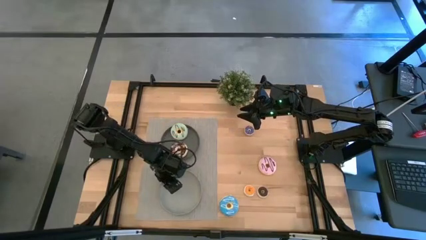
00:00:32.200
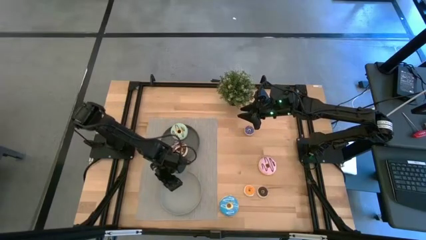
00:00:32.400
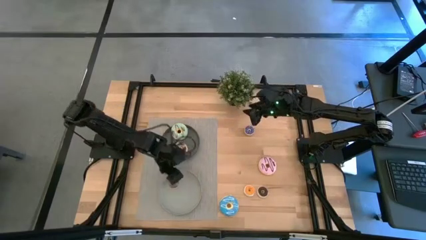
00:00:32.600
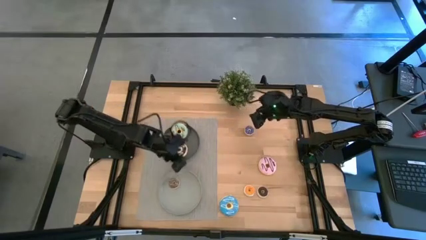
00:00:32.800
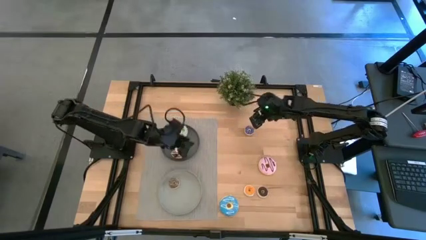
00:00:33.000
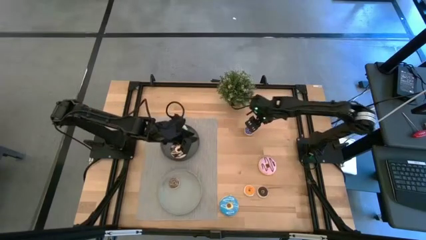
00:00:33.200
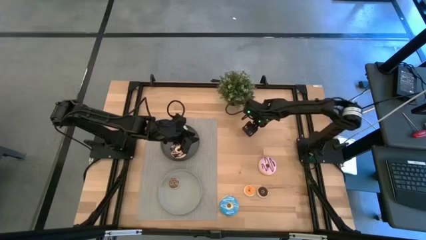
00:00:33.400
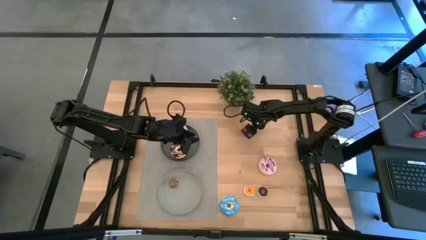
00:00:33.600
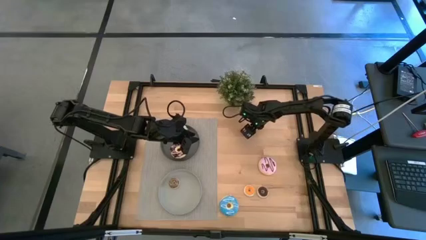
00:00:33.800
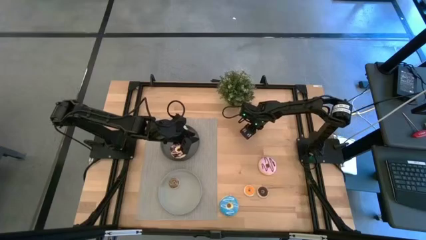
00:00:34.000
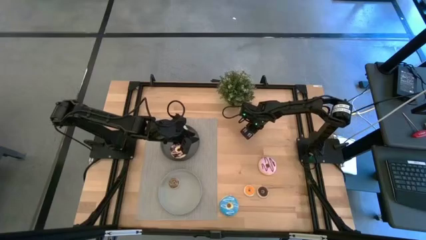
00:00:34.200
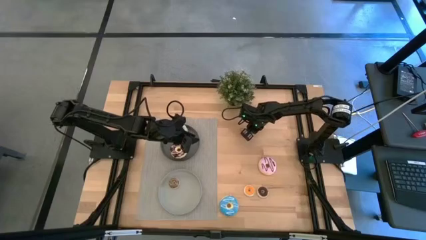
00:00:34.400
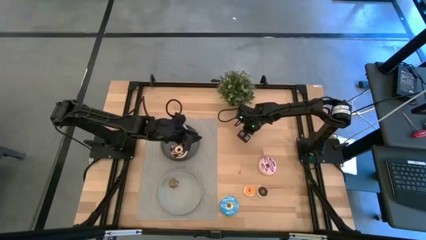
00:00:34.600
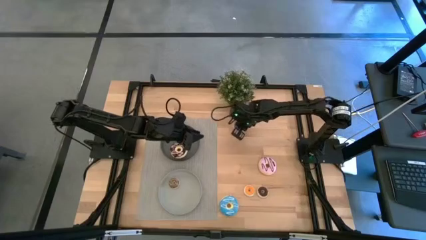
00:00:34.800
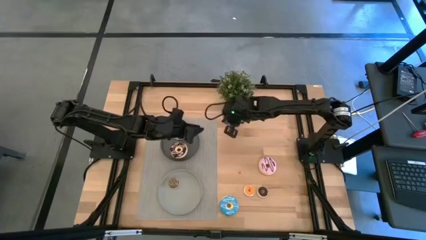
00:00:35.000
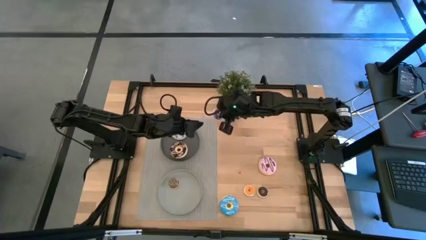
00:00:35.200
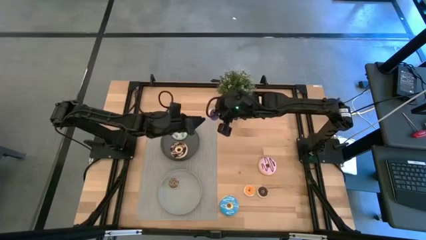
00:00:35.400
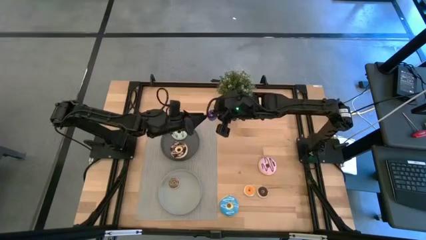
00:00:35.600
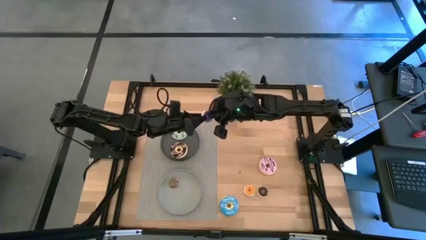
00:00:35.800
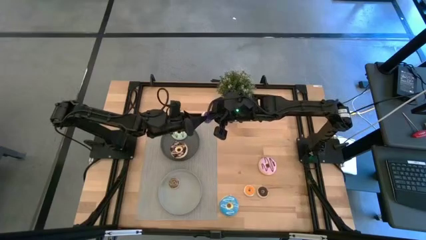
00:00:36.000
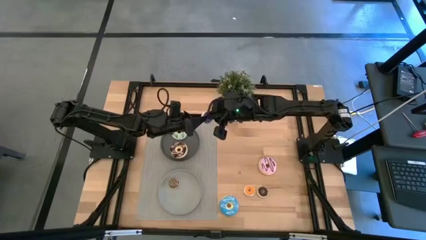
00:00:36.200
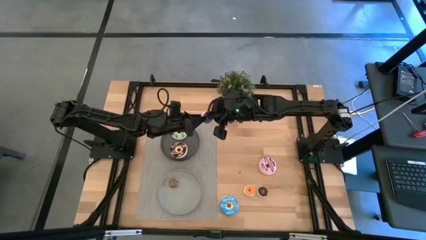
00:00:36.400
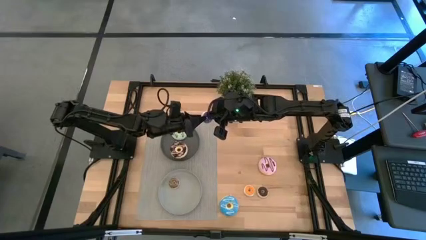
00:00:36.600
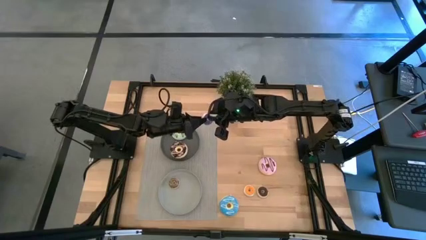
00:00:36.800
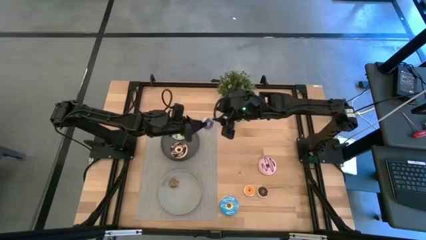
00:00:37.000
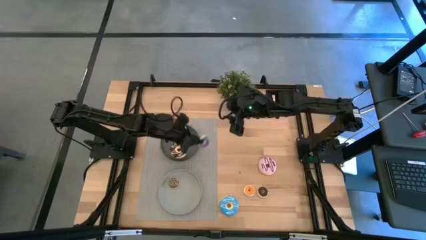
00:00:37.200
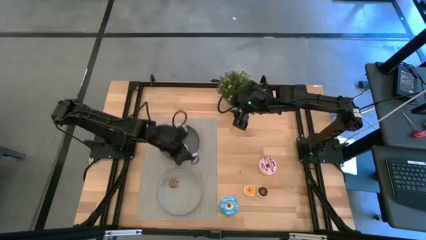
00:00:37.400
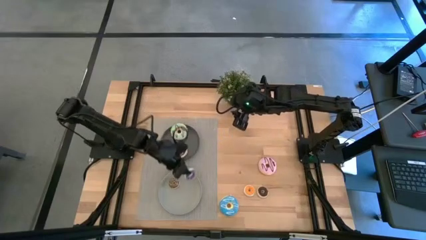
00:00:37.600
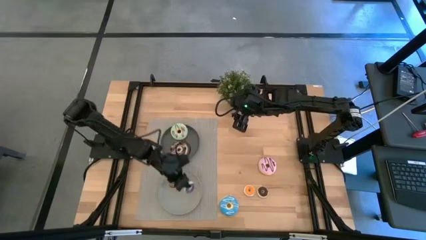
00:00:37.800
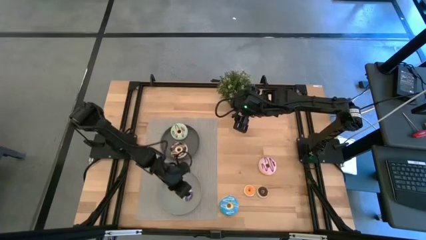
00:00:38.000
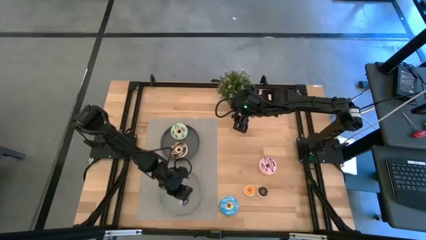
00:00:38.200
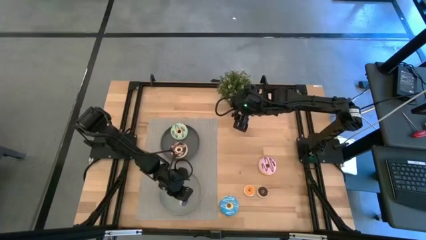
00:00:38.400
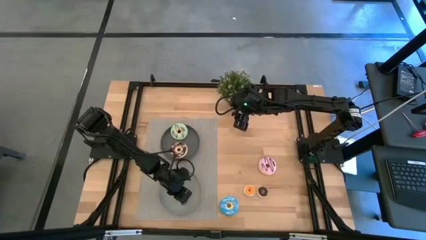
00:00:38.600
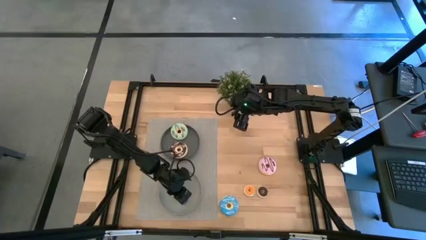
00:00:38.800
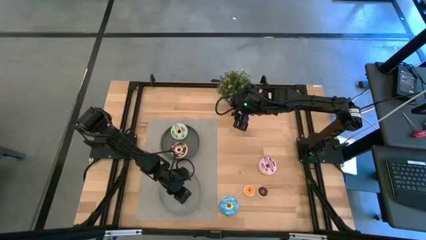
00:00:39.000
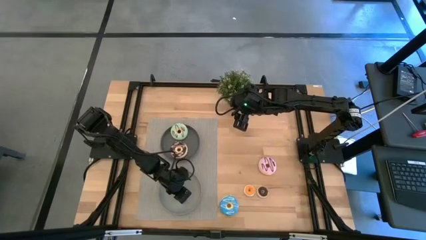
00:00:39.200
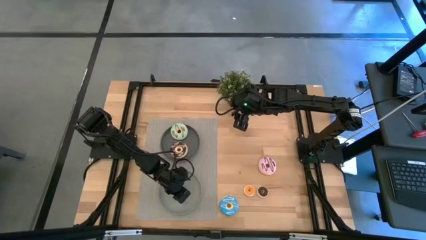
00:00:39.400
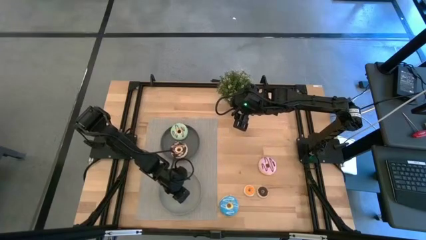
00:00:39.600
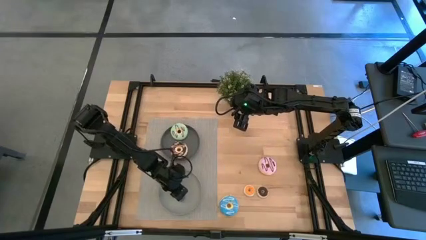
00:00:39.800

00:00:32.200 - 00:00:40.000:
Task: Pick & Place donuts
Put the small blue donut on the gray plate

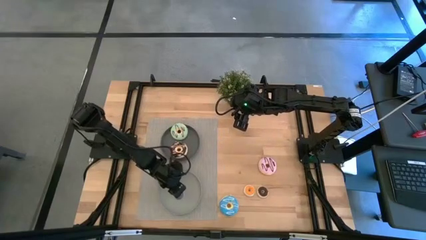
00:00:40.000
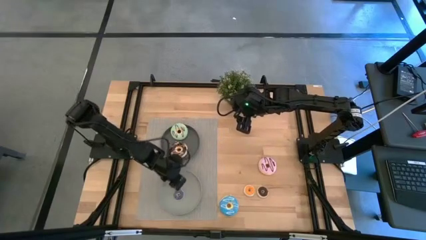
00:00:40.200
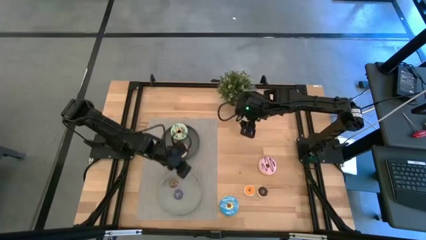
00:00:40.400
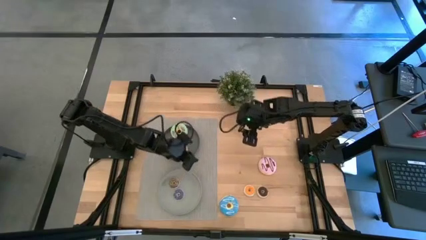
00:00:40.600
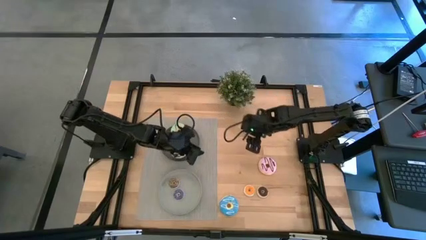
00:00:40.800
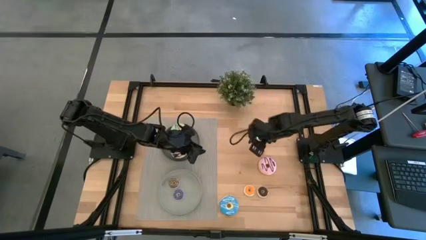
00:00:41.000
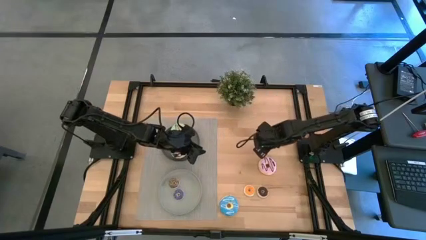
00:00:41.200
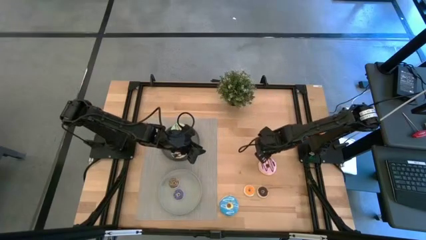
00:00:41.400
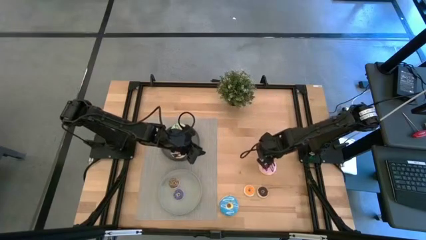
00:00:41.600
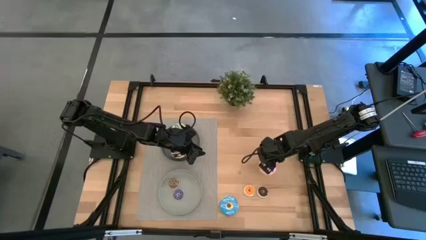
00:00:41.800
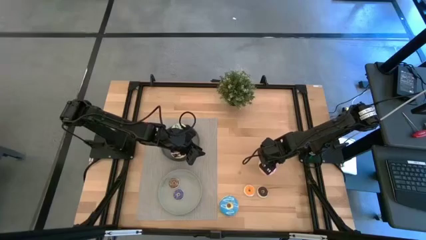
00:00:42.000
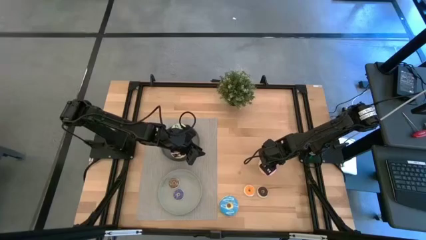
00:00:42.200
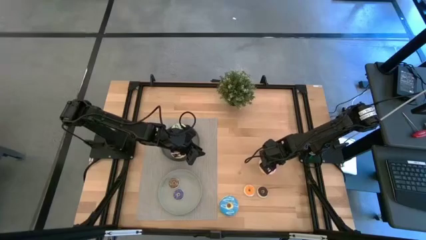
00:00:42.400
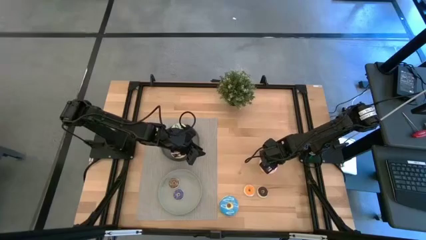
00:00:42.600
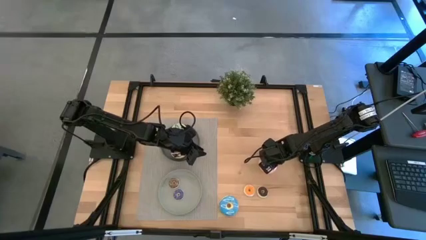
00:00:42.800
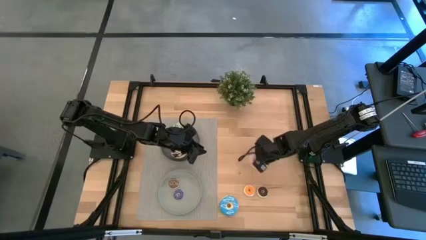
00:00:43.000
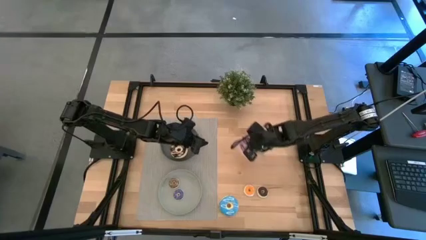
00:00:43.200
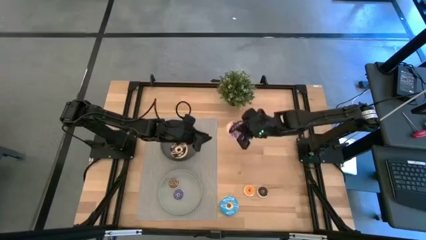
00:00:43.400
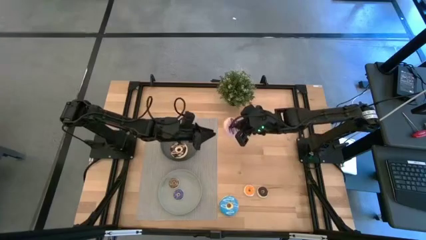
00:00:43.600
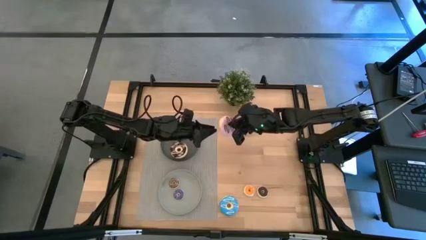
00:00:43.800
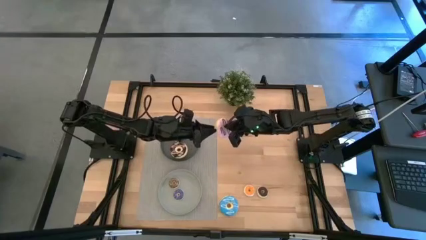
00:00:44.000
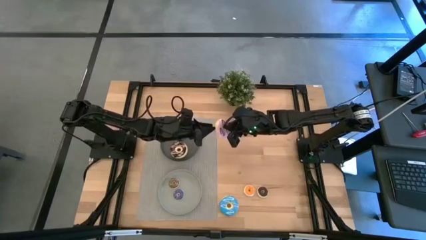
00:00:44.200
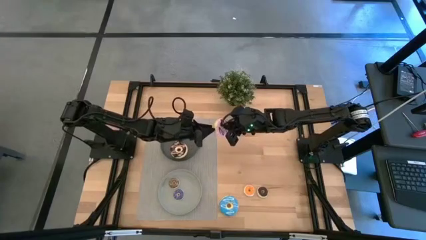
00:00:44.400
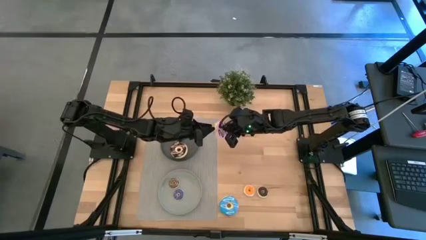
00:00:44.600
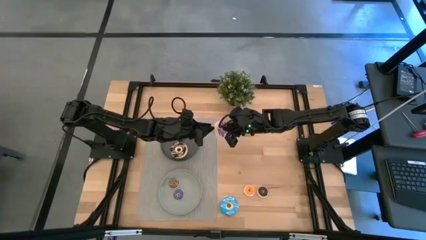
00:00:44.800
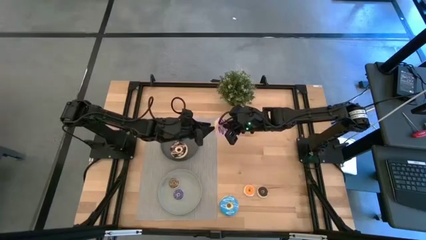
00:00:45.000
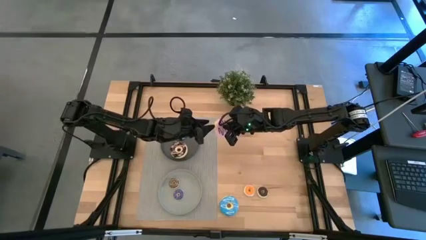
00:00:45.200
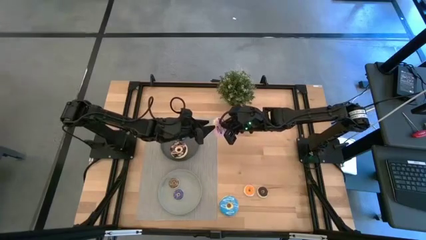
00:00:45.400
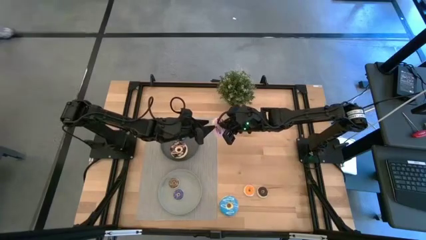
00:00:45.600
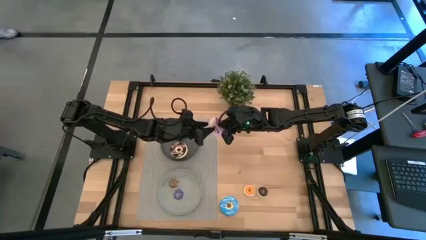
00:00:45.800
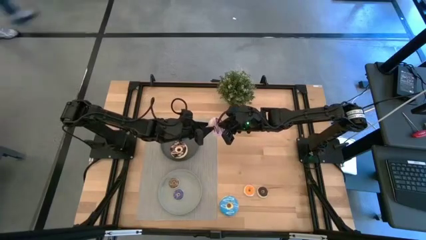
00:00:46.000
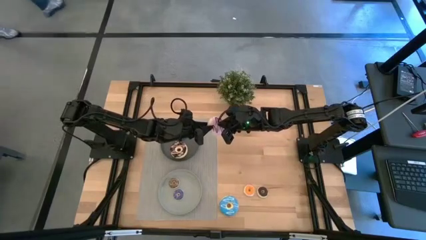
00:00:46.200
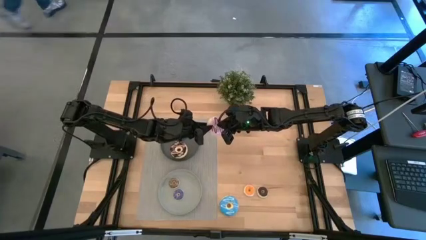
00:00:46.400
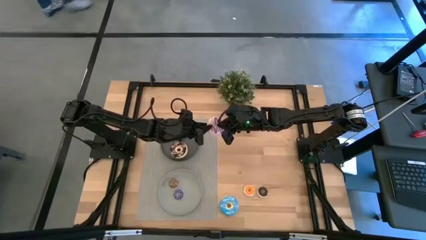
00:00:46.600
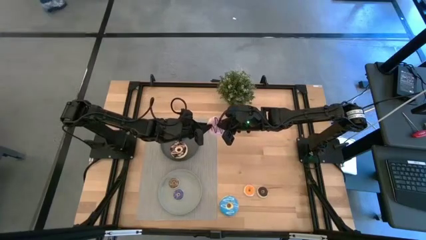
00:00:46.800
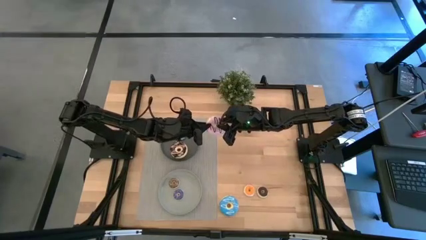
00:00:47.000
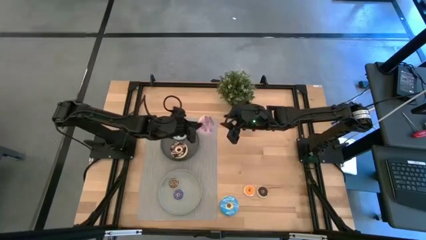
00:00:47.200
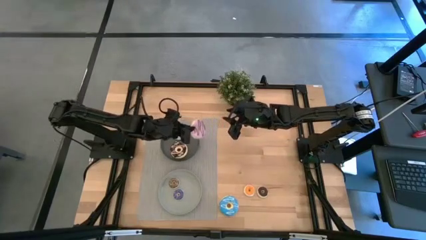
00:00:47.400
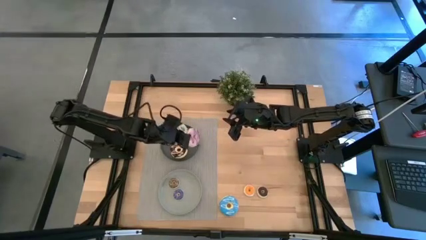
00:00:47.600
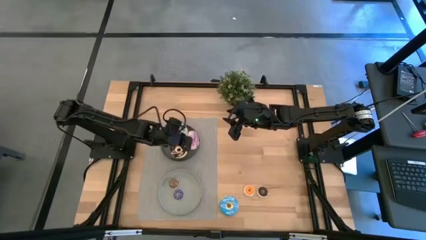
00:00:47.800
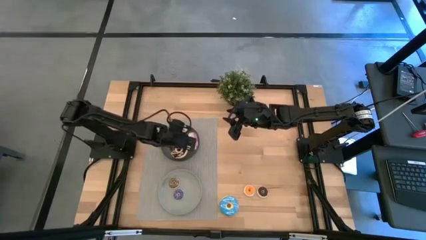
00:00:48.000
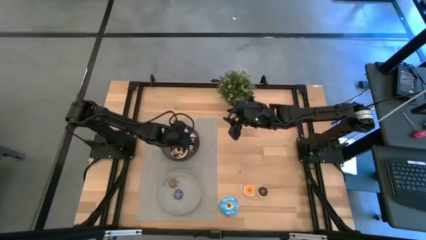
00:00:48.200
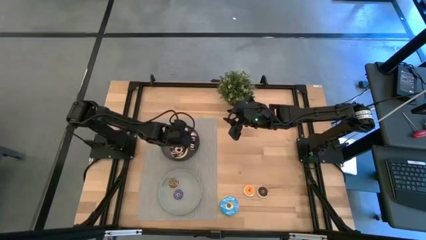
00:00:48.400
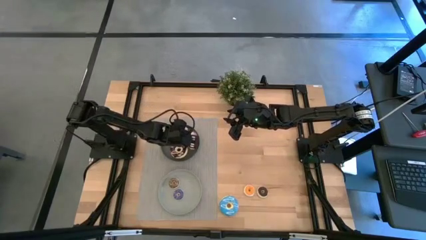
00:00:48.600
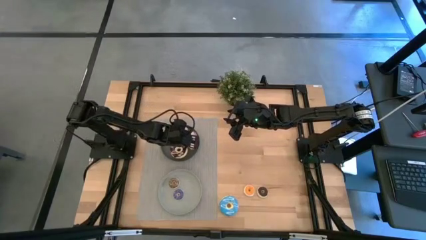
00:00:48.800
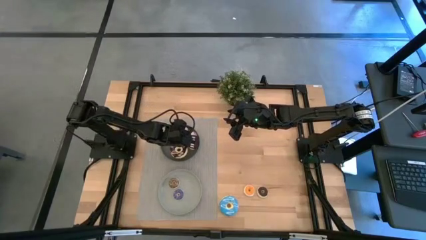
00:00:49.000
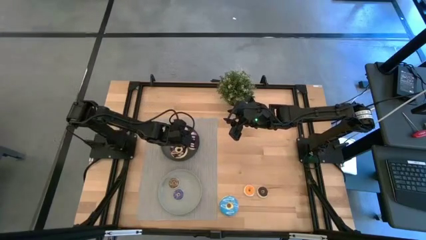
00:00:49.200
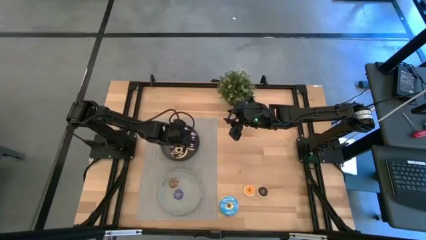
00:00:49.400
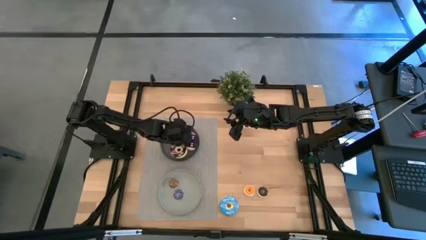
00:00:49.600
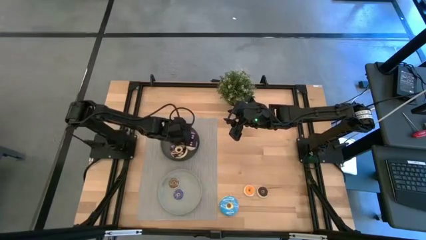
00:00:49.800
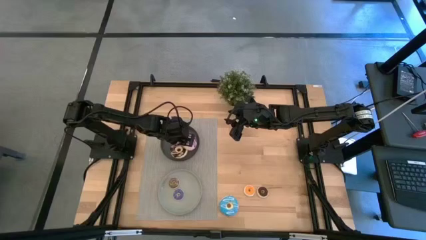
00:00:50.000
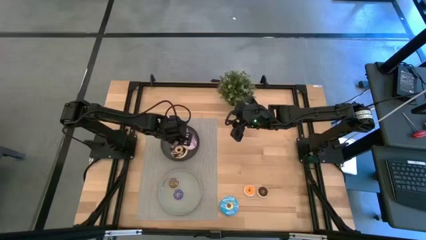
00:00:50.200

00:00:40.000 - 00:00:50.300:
Put the big purple donut on the black plate
